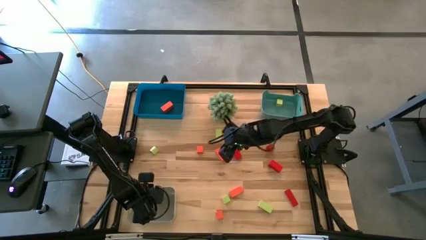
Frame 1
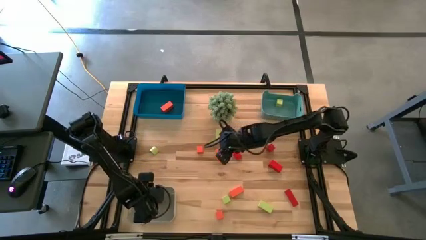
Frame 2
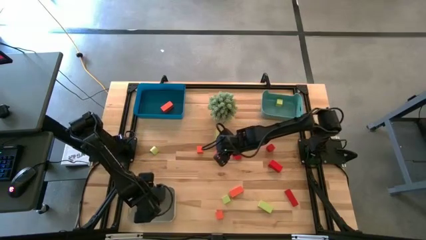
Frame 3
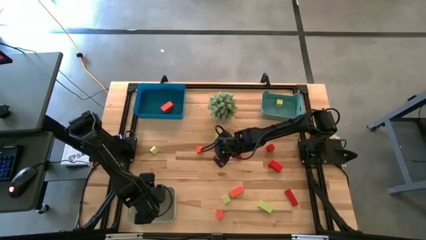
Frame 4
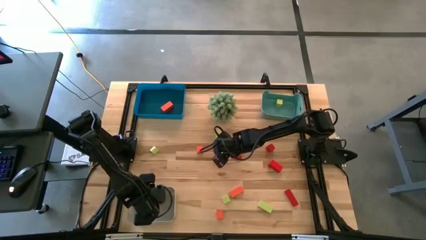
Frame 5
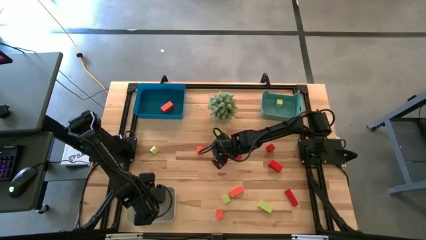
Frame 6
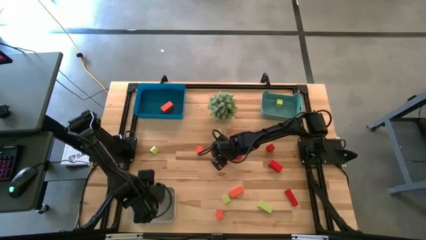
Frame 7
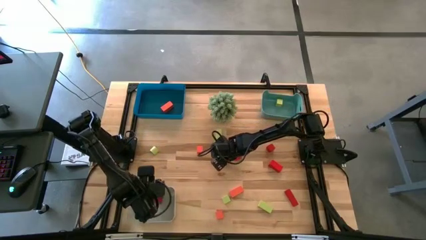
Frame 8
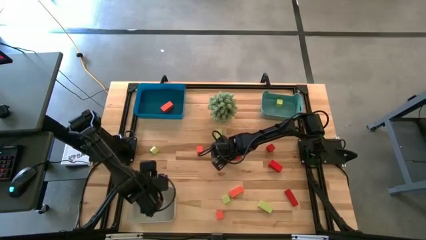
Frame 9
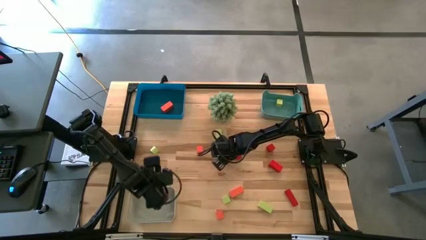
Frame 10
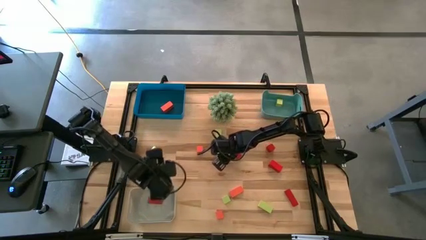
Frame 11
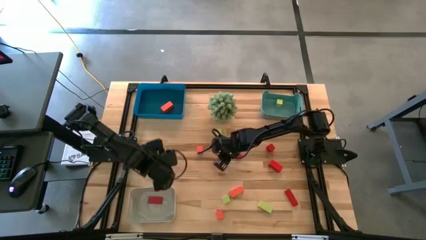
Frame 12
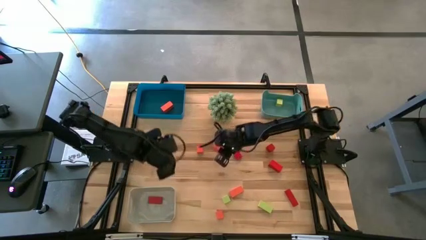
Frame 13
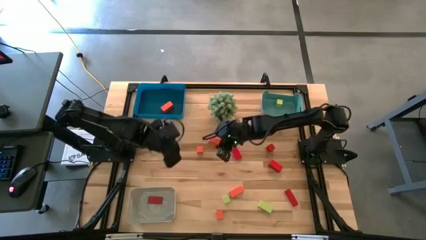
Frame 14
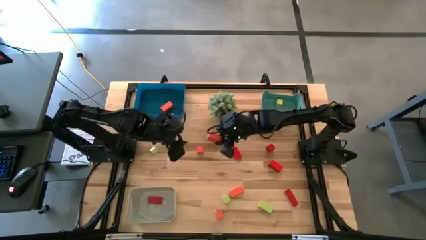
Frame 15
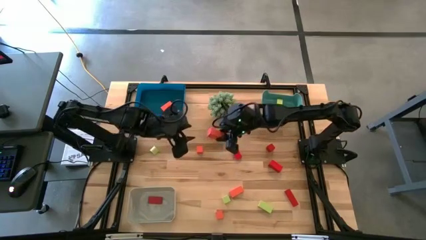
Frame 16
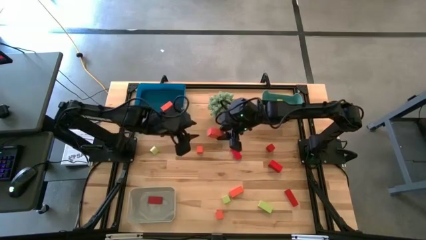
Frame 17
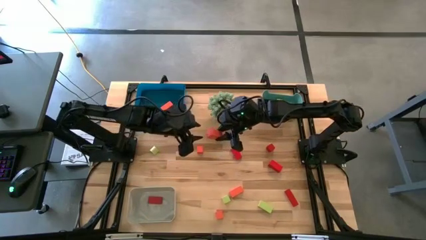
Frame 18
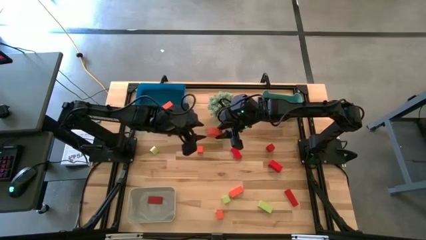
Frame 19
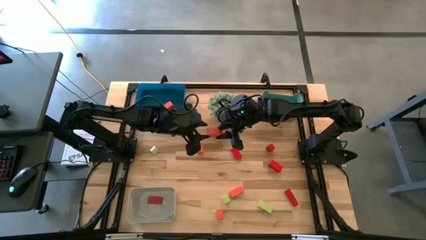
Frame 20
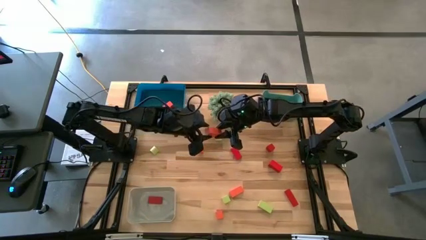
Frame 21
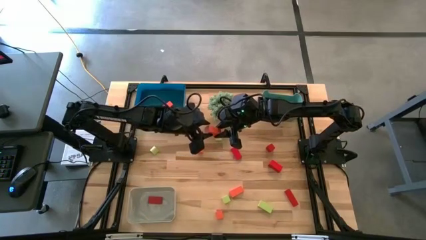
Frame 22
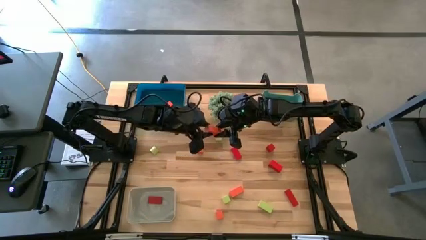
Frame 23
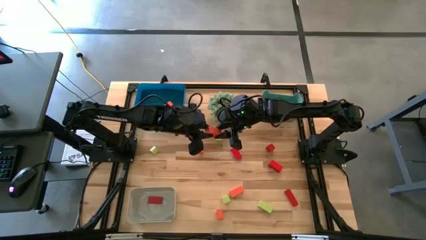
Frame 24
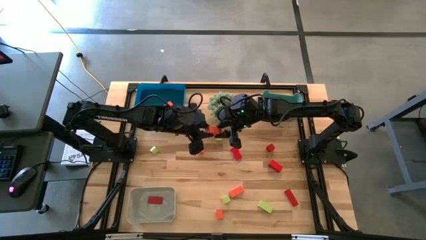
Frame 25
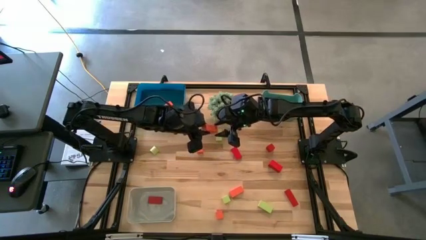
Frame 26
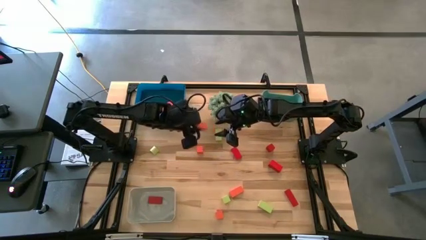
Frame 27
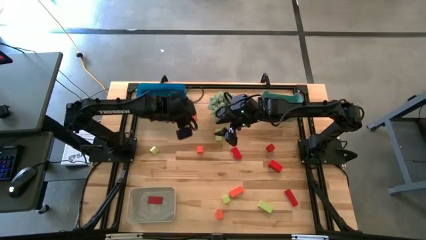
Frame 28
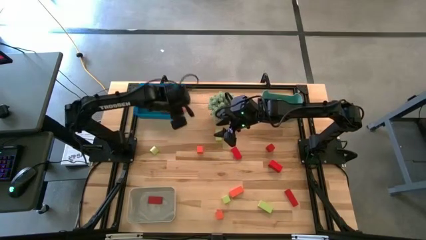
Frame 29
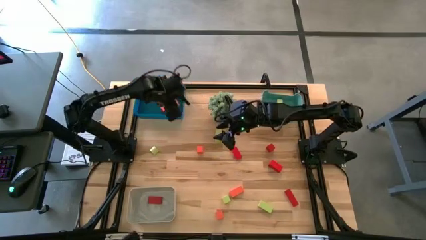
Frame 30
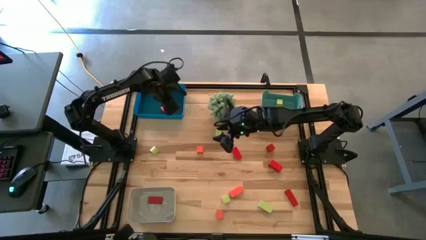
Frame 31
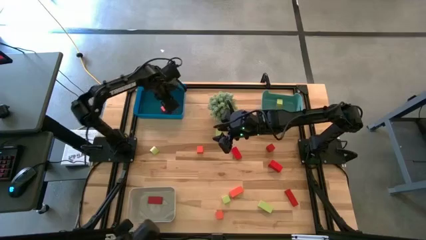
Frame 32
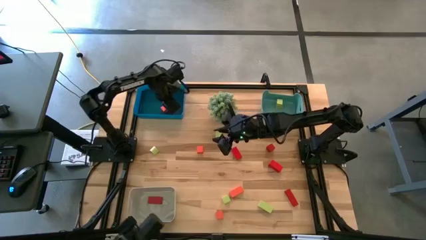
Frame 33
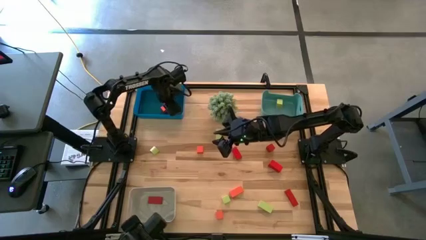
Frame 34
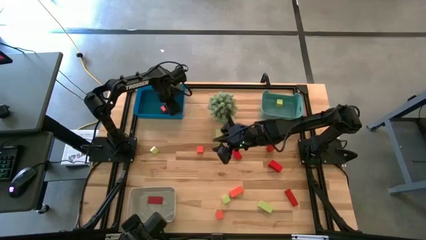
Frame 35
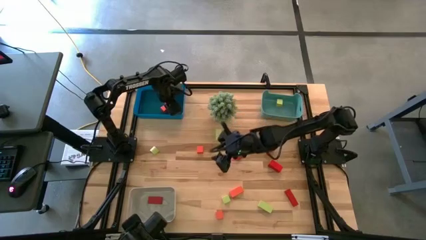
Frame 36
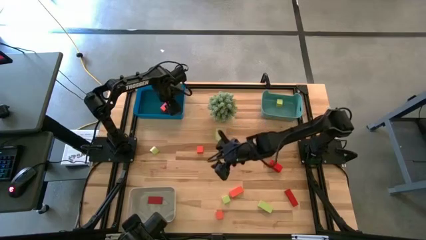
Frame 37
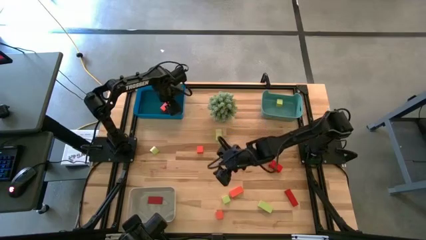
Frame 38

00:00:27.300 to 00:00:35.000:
Task: Sort & place blocks by color
Put the orange block into the blue bin

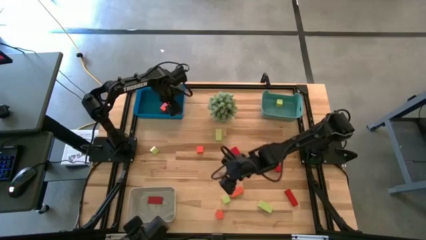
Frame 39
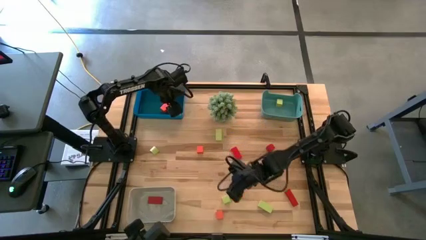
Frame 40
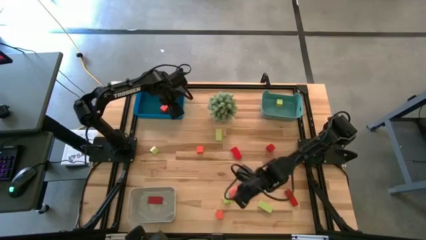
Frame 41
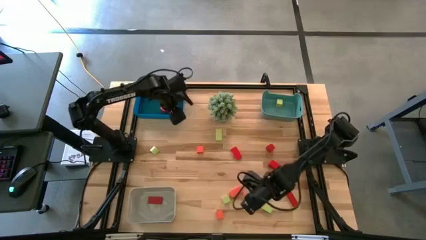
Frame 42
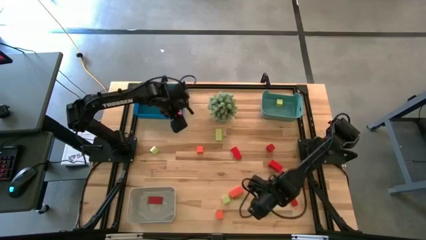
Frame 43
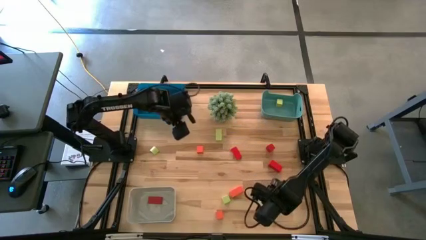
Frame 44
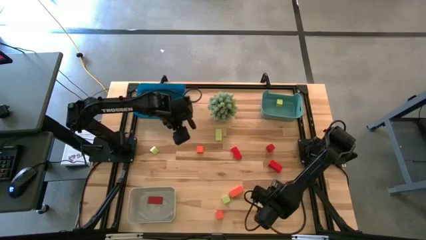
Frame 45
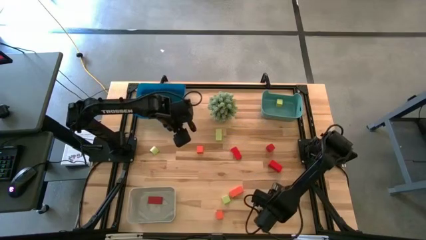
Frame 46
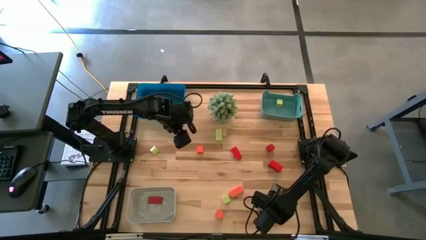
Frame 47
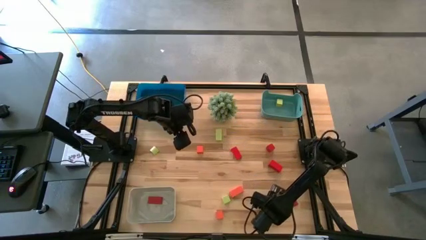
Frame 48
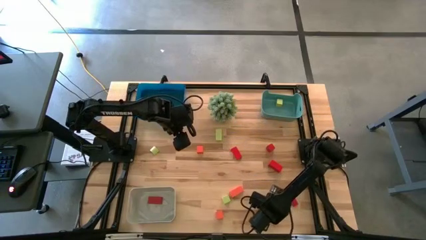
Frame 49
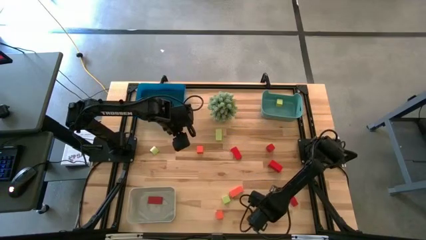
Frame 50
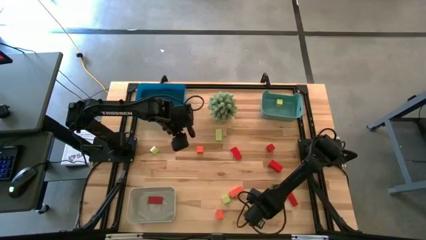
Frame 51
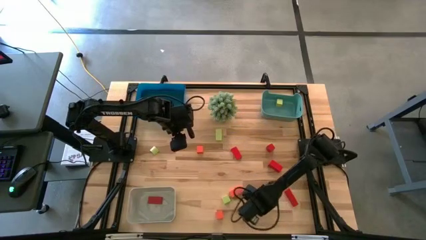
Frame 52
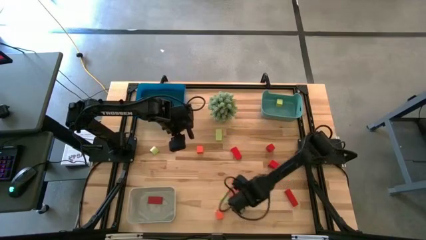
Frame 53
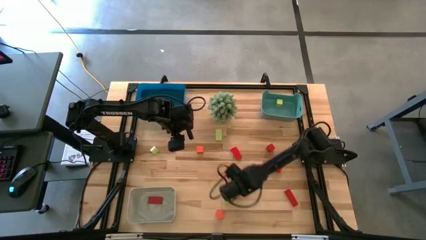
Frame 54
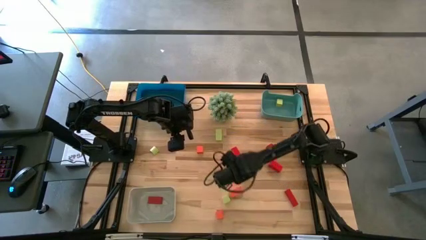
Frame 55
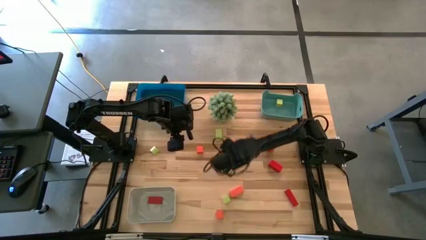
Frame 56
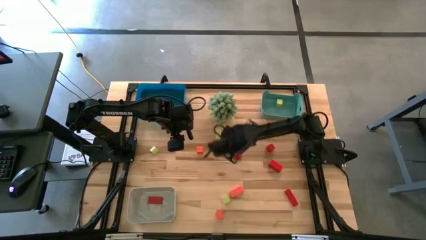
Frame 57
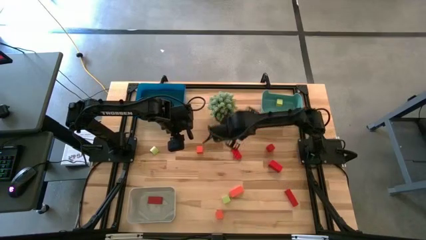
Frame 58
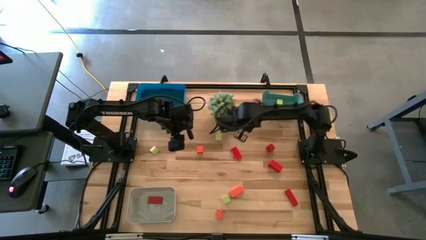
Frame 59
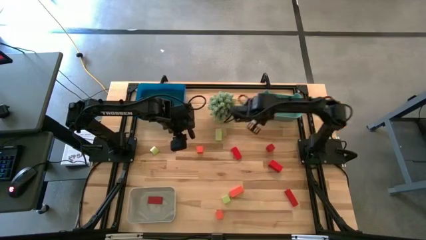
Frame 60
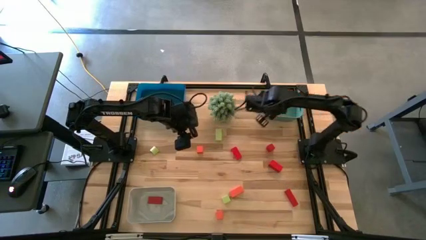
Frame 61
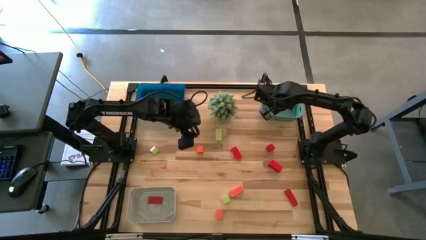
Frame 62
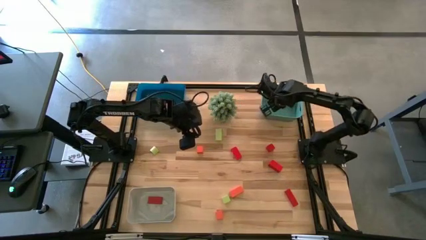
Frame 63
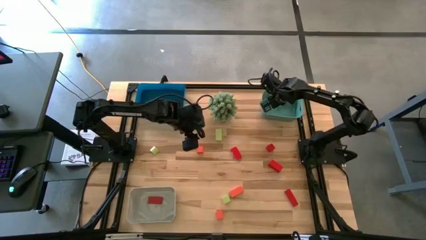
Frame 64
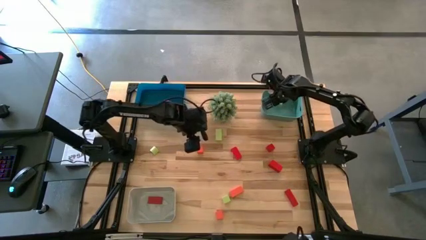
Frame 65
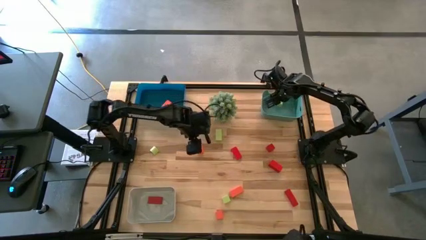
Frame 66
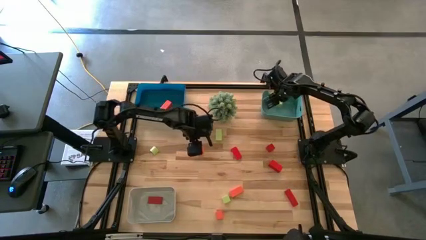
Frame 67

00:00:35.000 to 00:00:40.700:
Put the light green block into the green bin

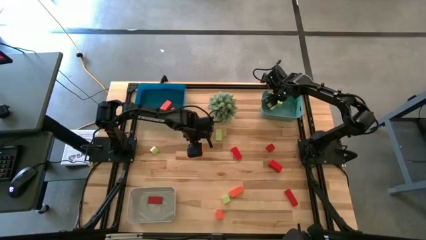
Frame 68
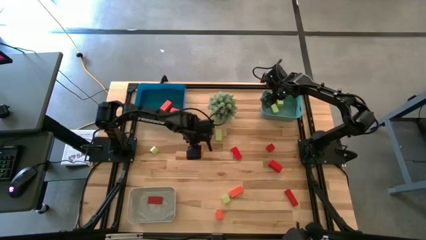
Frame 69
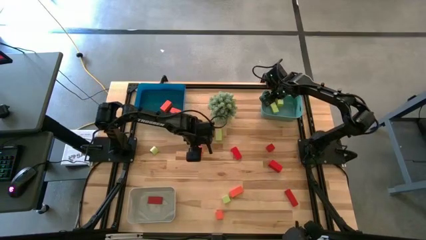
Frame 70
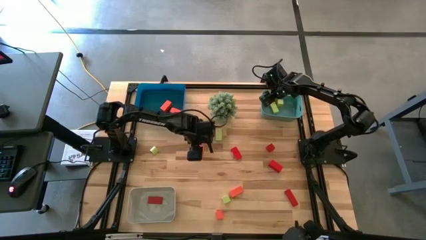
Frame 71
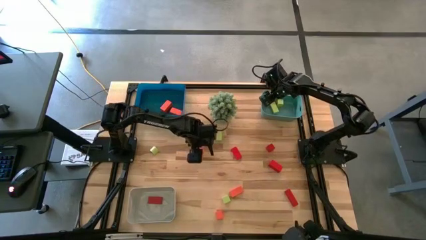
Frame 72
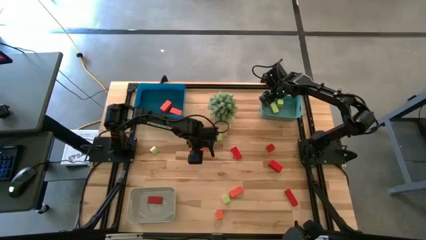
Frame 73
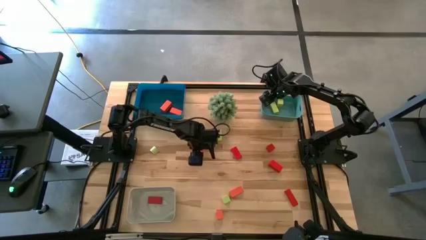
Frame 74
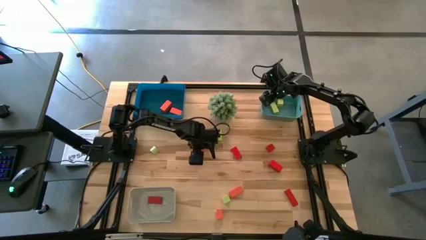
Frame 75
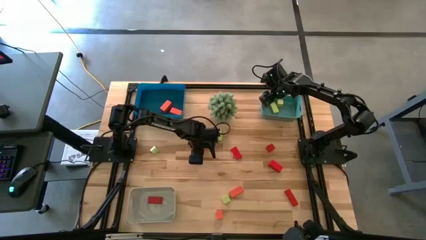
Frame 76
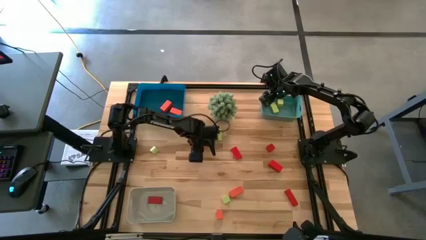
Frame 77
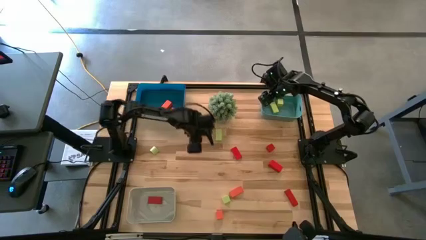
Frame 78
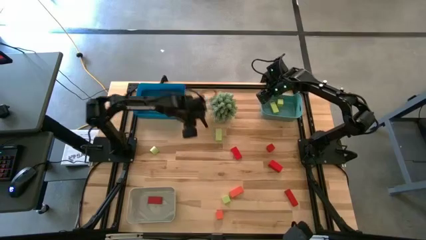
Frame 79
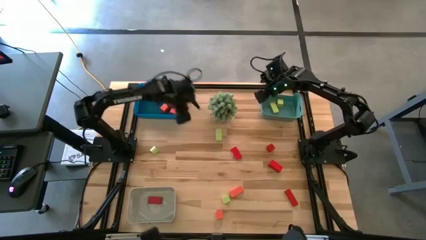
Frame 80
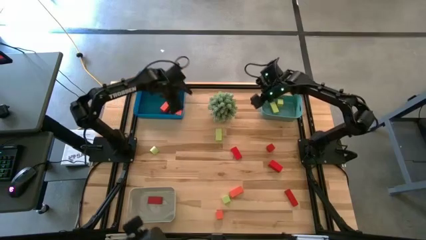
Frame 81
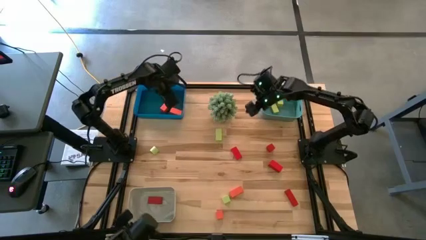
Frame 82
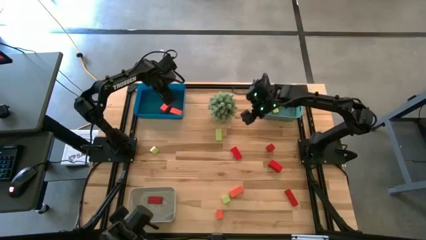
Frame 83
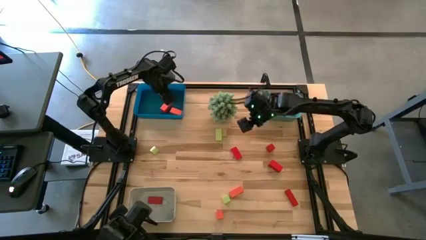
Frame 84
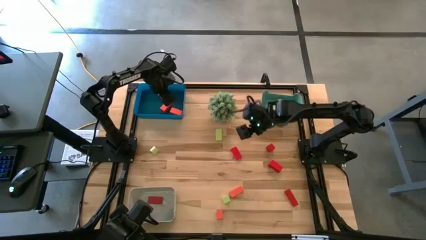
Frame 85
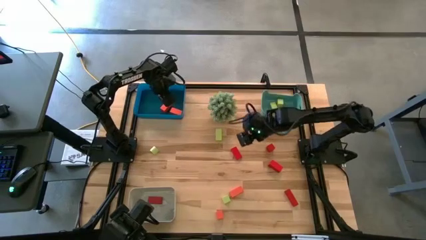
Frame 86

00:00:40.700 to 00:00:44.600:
Put the orange block into the blue bin
